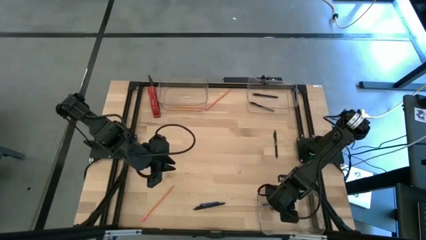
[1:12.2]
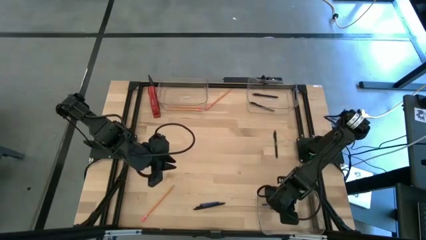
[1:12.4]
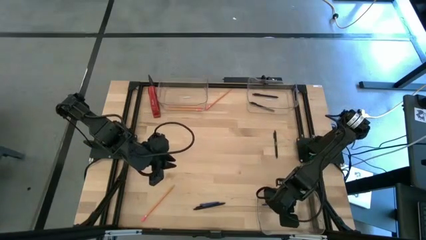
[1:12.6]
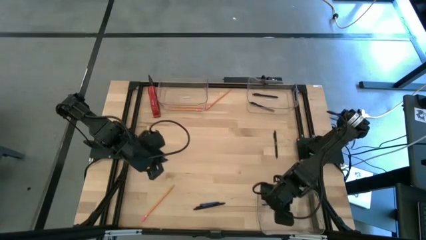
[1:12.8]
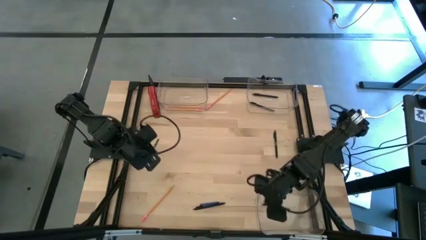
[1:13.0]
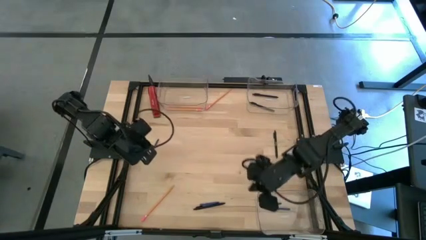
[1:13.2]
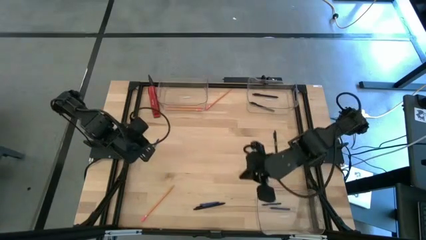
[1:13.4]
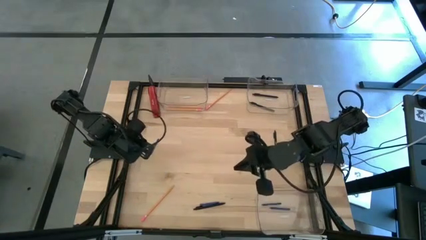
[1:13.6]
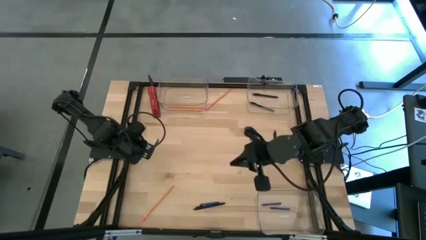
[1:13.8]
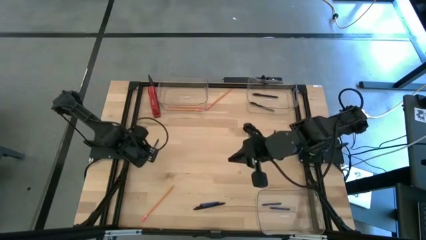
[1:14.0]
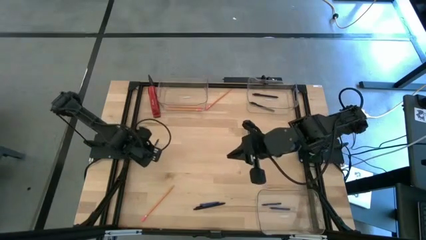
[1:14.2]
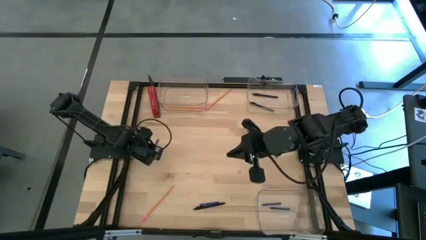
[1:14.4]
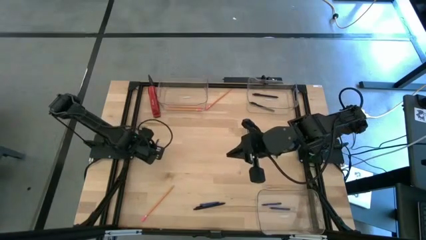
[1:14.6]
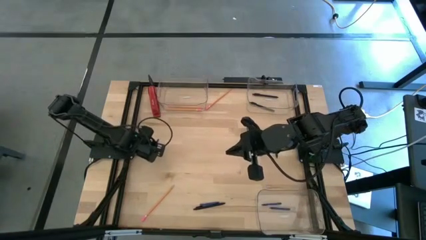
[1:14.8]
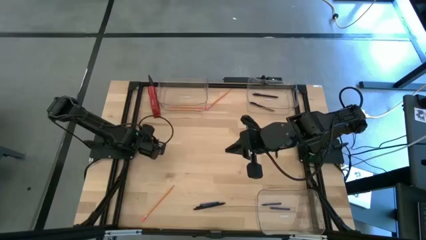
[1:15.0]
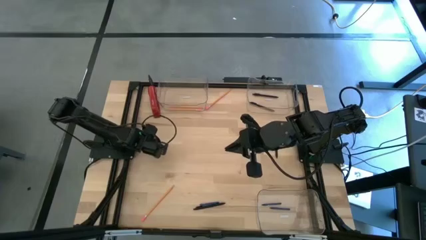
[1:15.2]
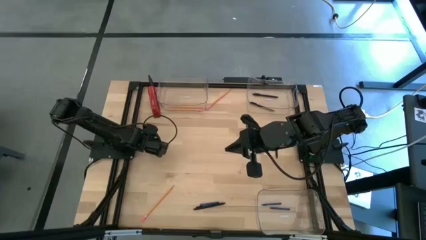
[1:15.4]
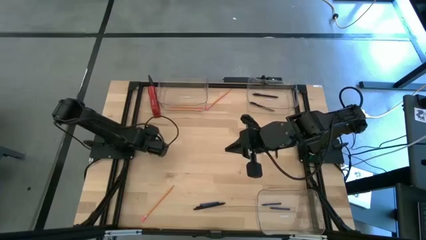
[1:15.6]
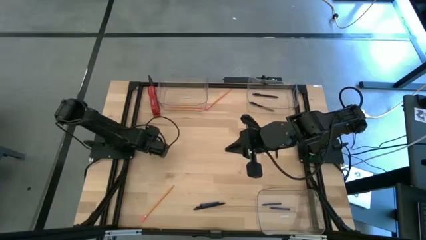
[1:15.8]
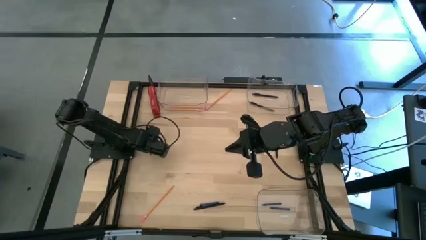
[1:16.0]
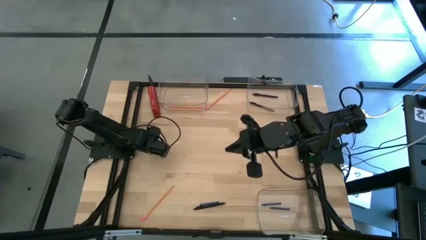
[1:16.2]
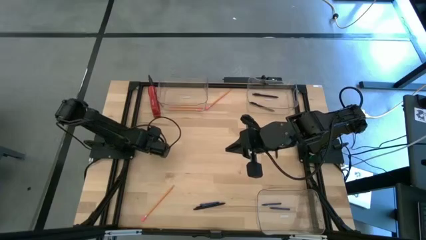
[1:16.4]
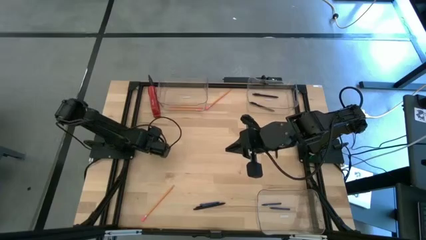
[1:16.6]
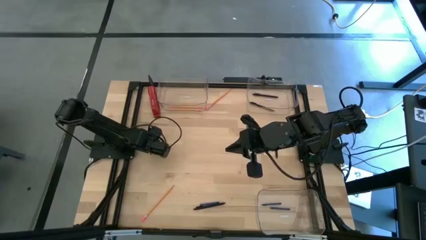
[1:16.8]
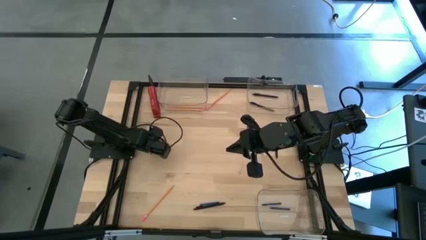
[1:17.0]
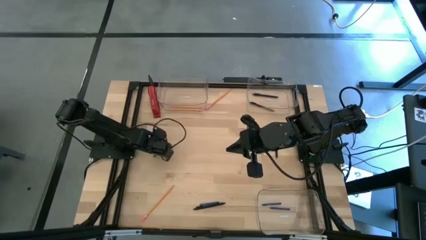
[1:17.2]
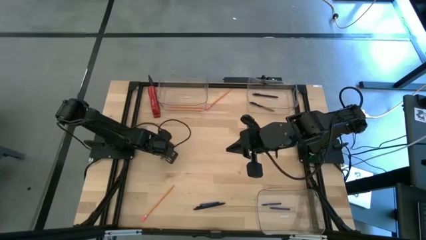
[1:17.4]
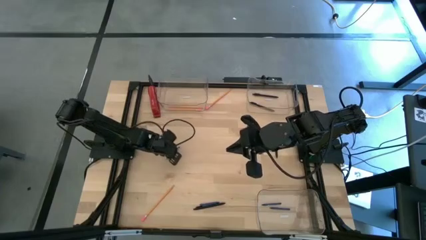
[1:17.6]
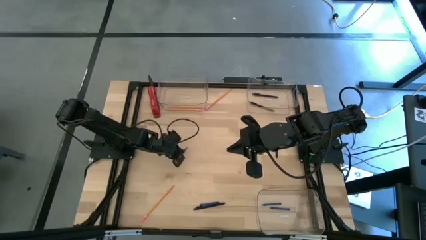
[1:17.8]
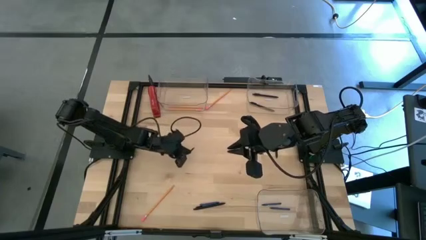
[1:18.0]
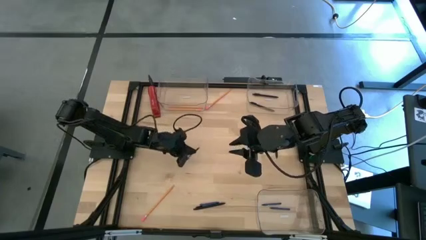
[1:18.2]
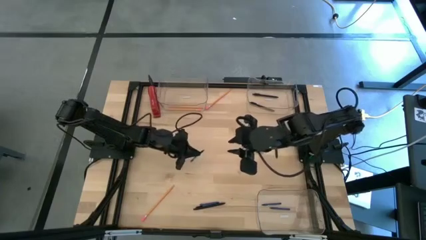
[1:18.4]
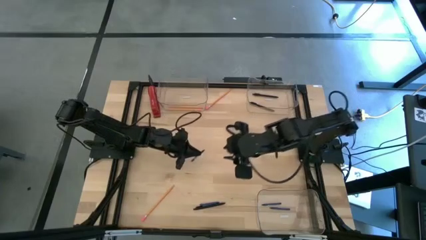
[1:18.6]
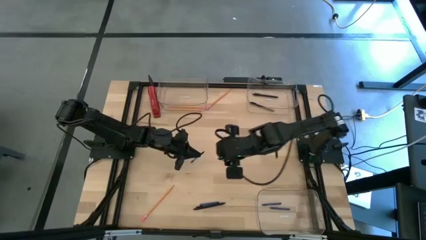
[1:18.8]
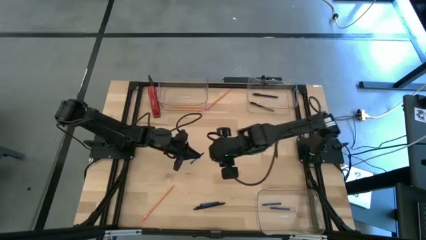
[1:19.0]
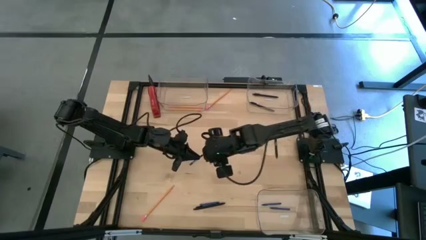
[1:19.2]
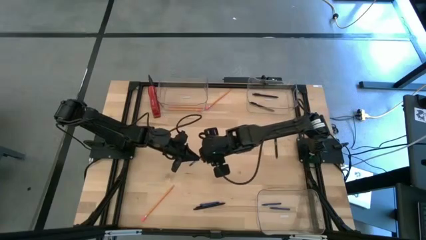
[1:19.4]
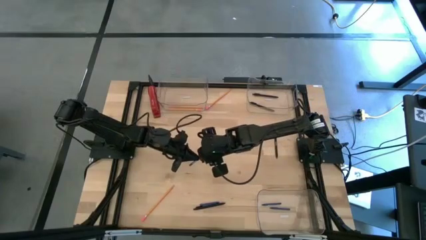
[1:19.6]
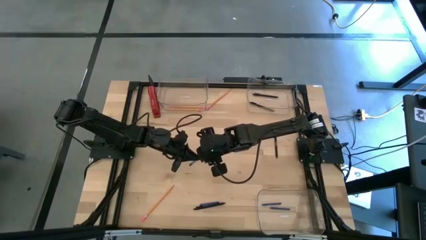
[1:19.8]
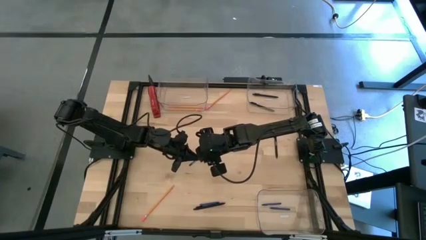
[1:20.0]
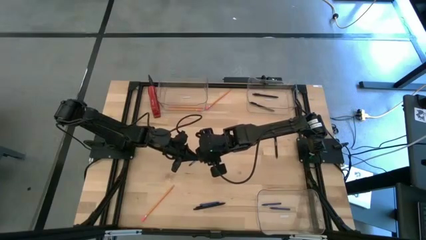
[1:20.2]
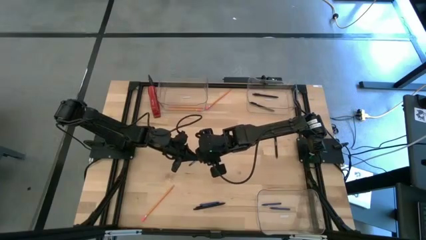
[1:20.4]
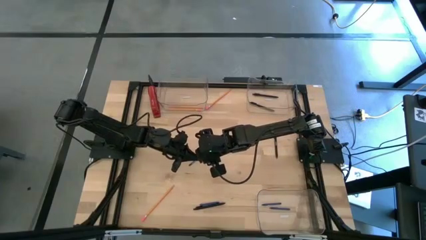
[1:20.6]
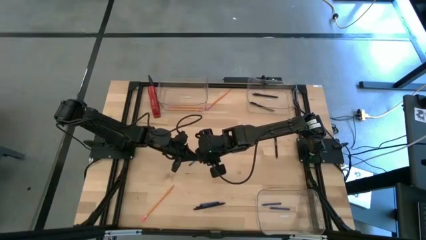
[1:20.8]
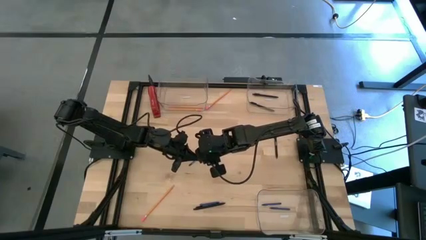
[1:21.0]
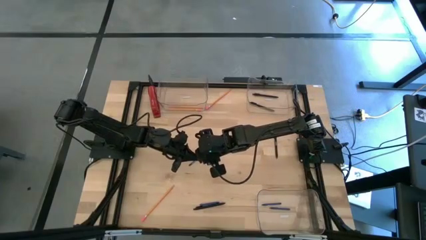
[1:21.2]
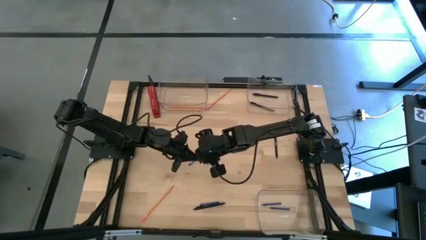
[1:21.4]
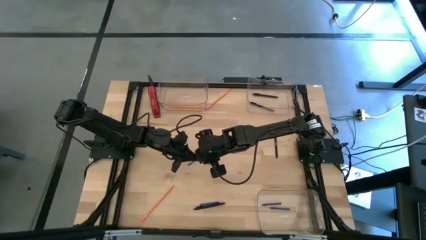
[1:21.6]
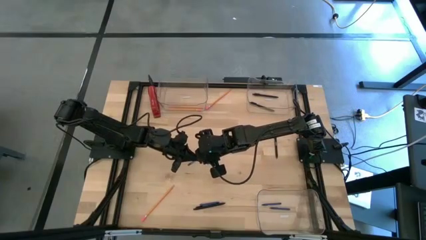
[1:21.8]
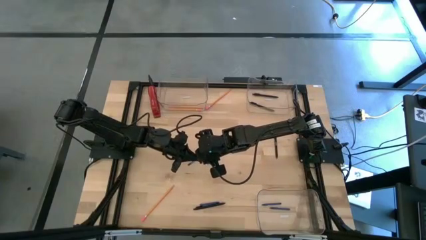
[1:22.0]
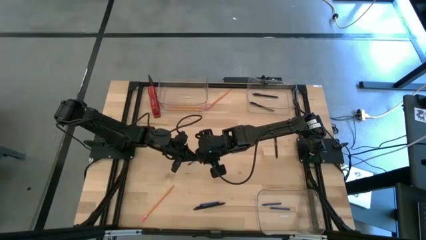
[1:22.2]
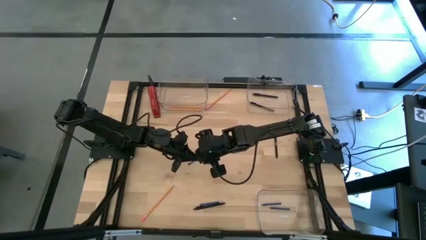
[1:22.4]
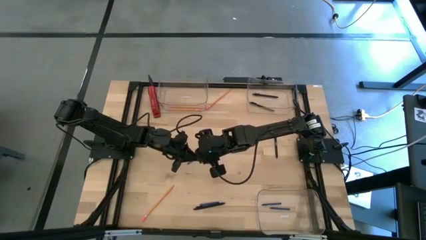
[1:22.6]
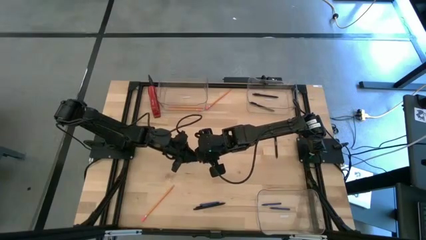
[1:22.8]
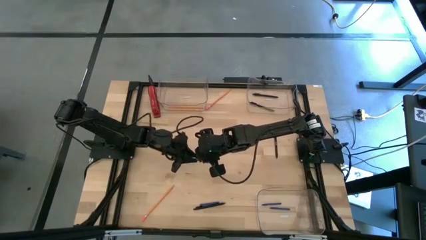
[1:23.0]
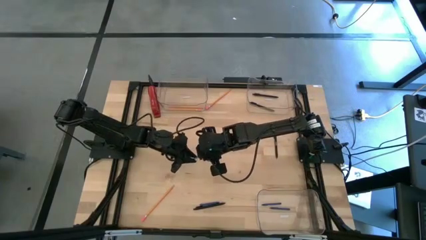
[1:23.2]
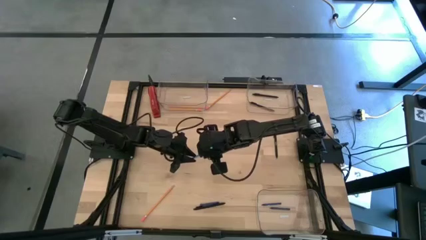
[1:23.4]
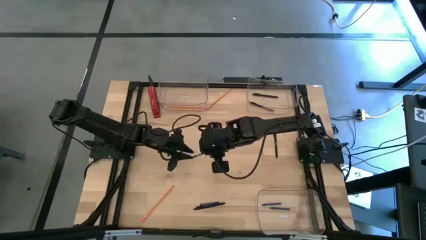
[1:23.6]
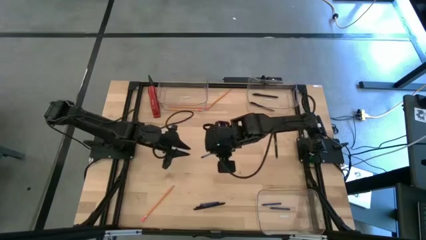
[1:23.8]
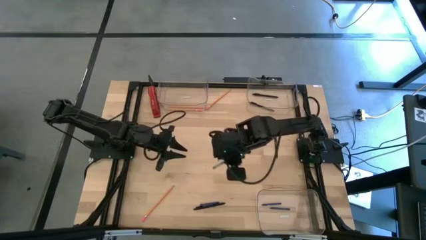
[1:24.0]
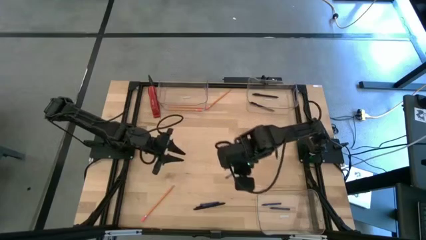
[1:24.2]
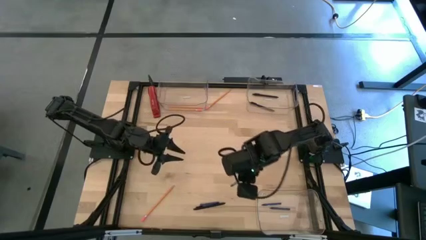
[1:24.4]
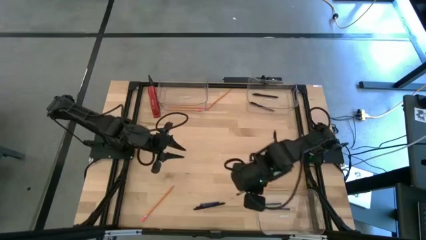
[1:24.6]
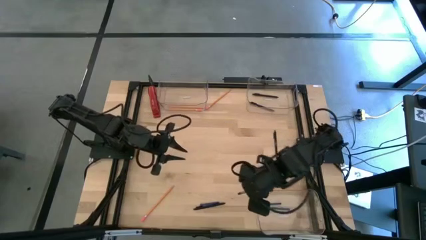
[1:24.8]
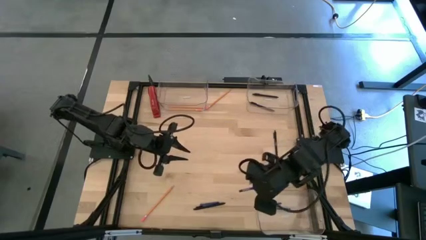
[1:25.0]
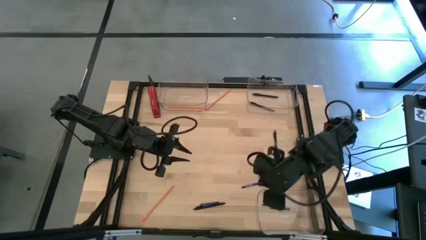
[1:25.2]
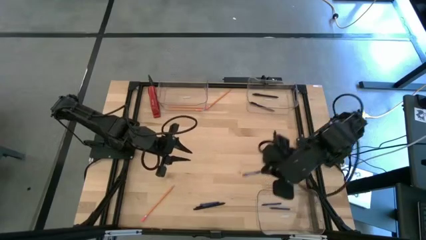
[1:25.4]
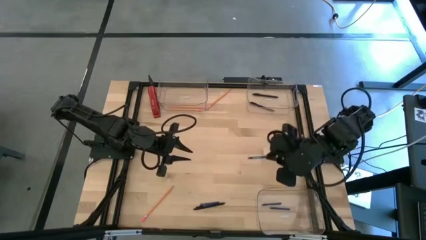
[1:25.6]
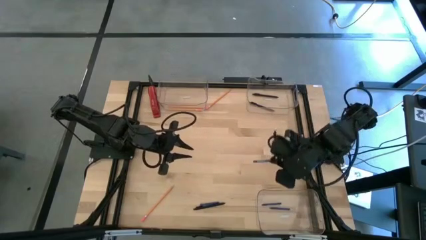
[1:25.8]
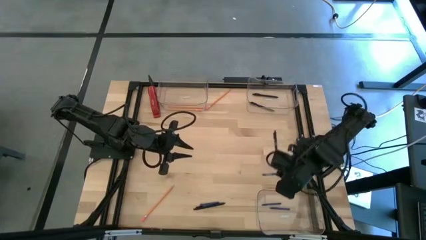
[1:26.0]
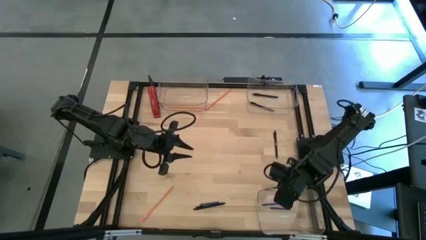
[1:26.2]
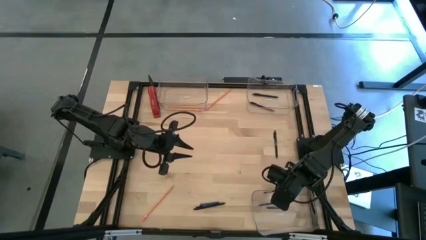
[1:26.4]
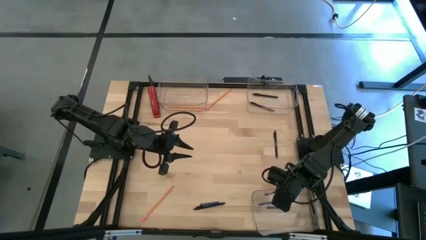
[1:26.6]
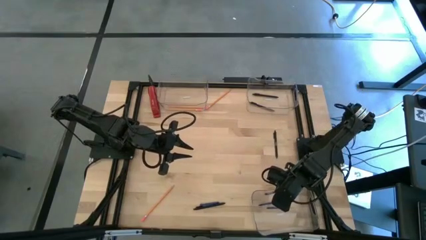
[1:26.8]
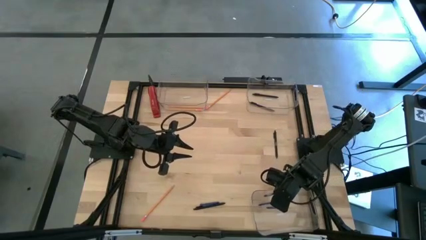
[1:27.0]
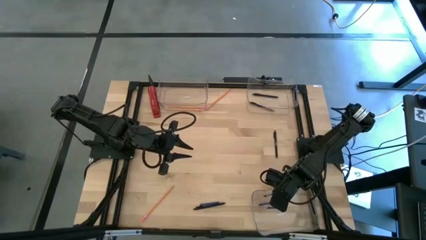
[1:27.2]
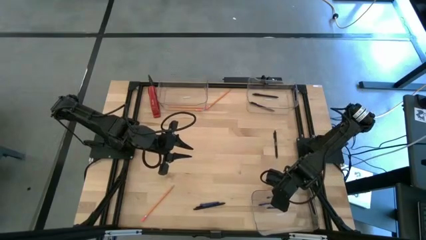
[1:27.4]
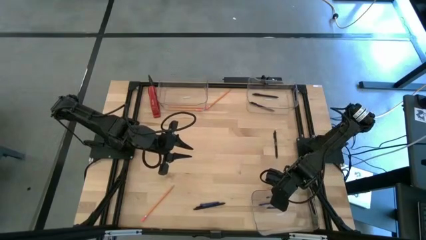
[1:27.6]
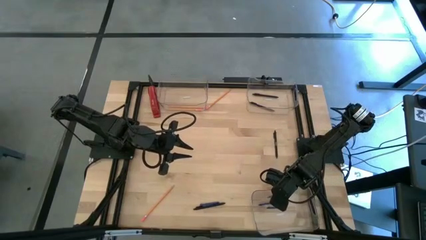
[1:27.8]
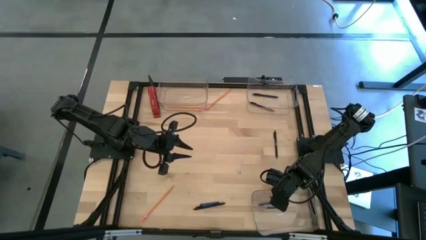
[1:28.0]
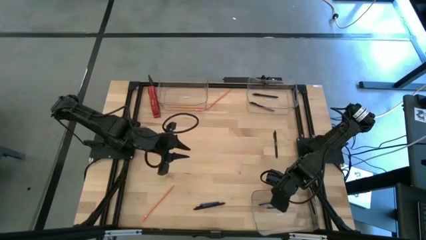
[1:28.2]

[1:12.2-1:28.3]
Task: Sort crayons/erasers/pens/pencils in bins
Put the blue crayon into the bottom transparent bin
